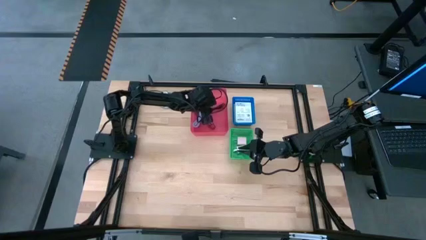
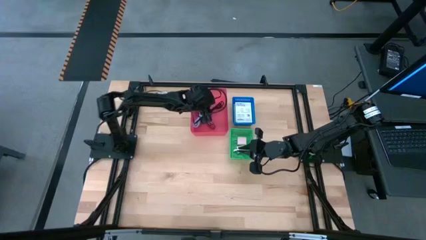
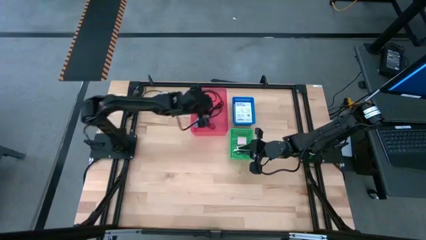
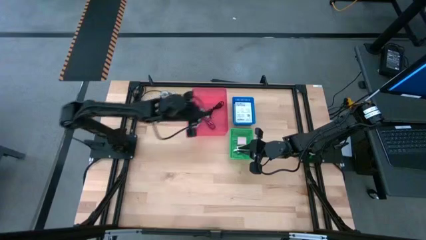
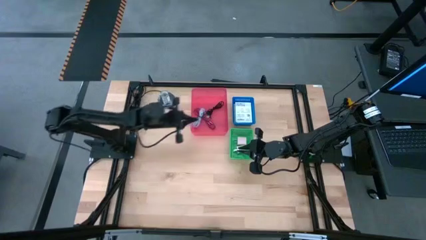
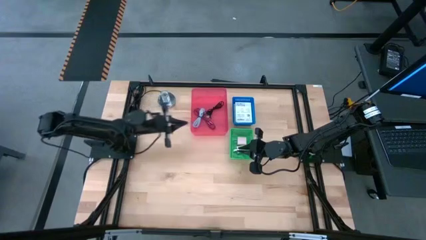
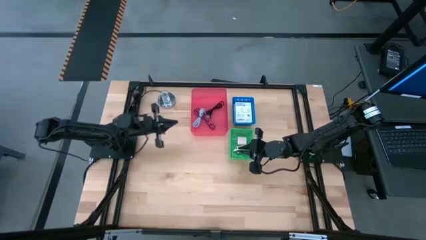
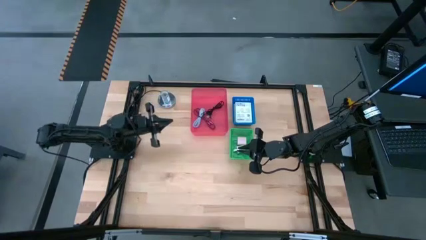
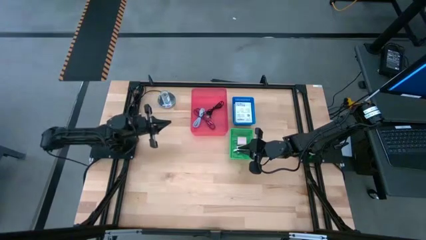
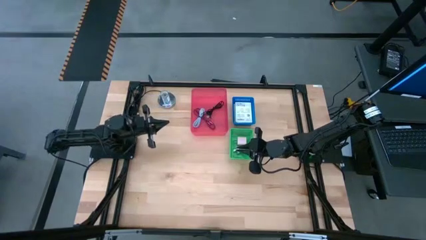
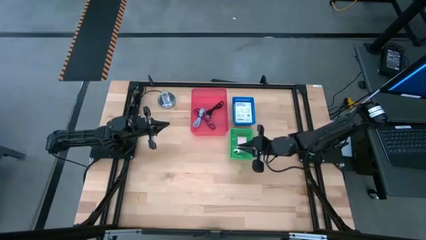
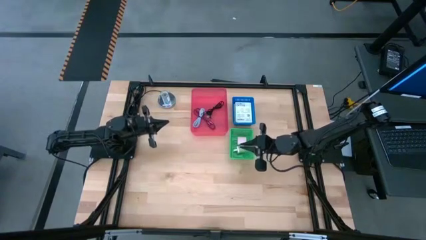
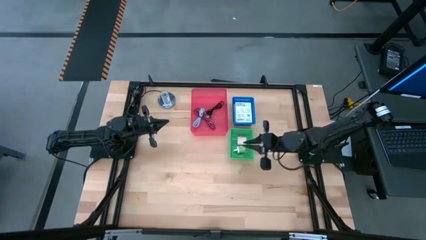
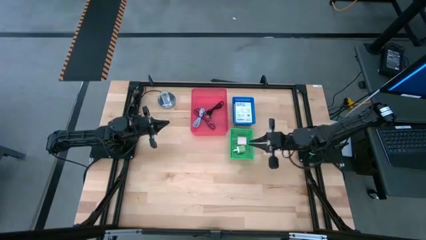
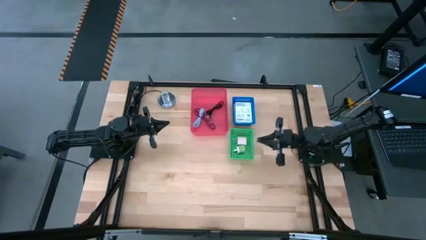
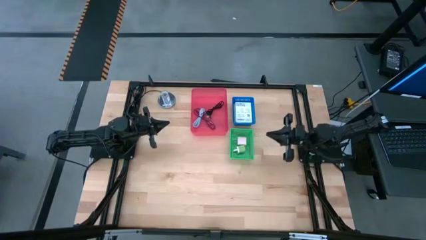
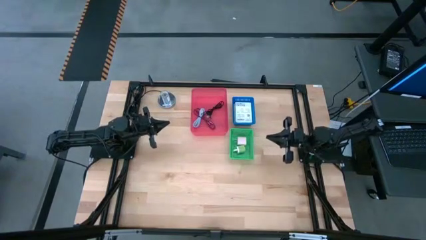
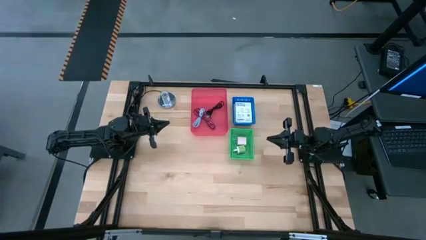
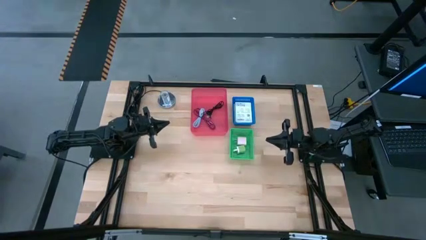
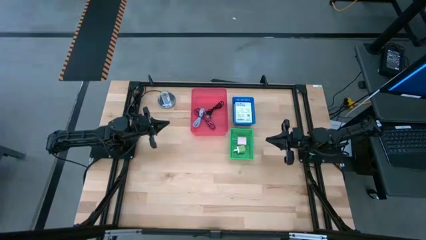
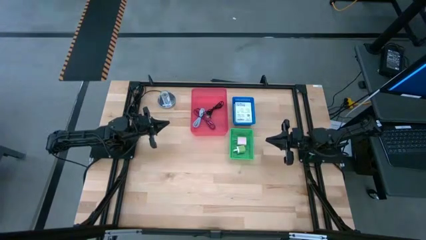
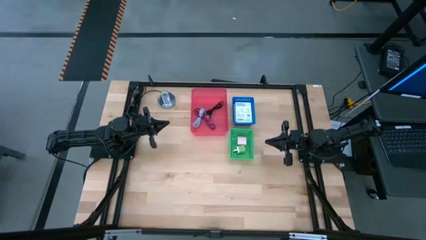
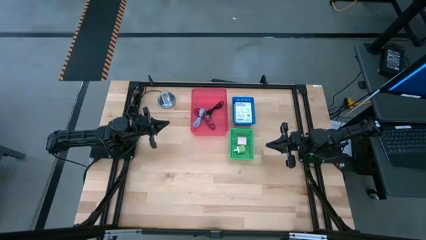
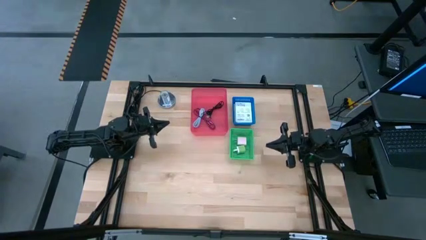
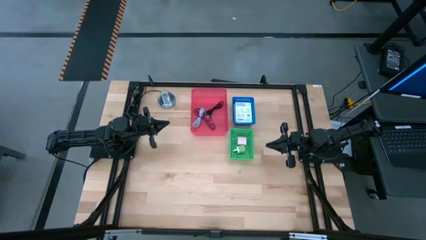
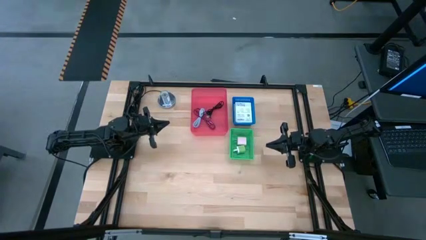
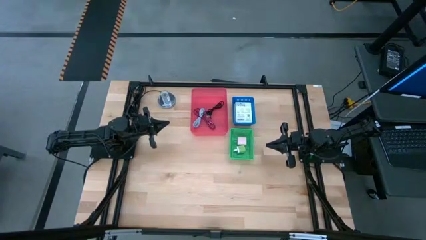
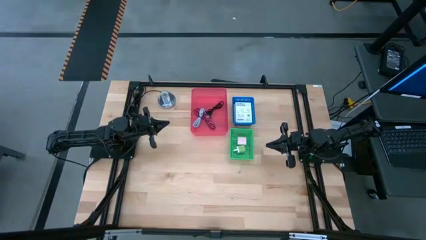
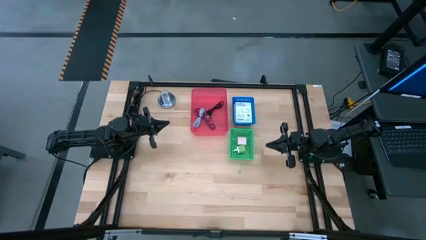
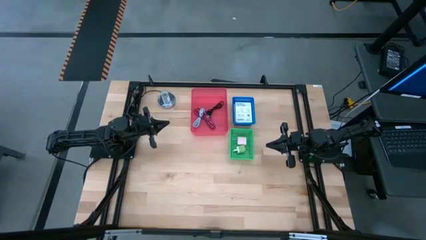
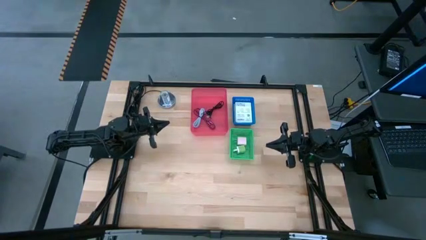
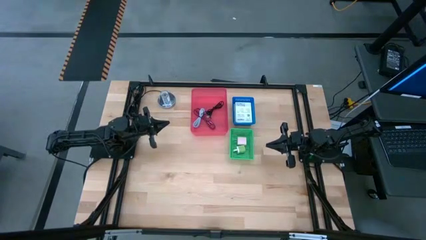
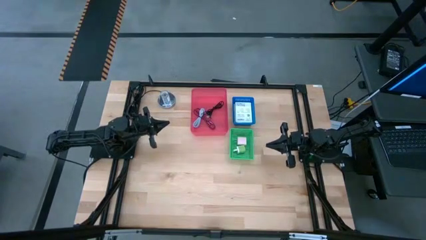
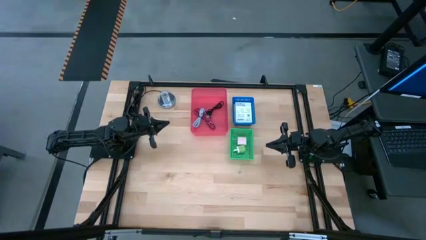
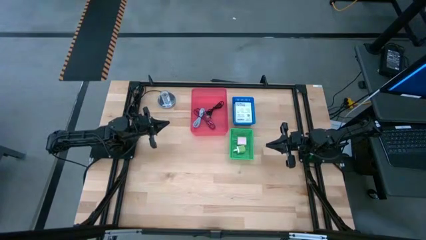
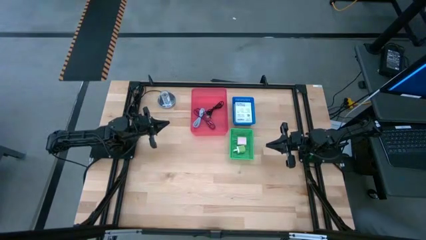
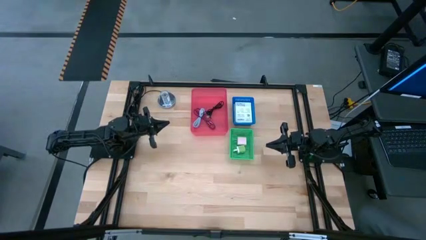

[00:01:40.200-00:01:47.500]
Task: Pick and place items into bin
Return to Home Position

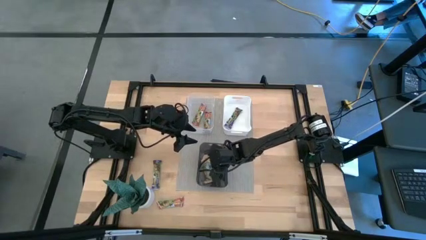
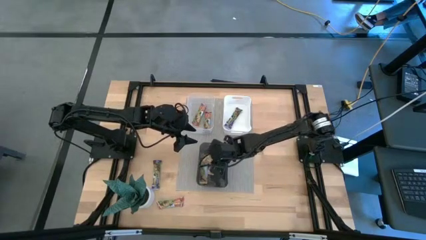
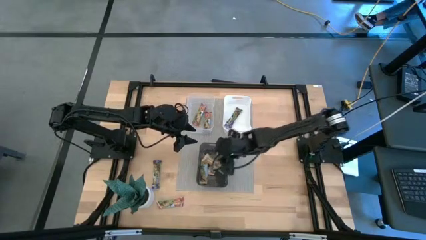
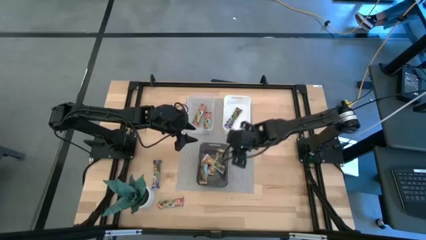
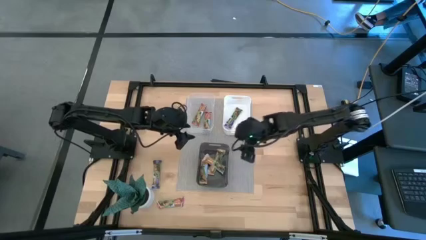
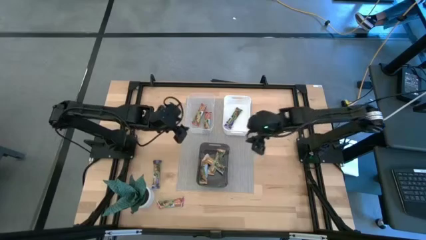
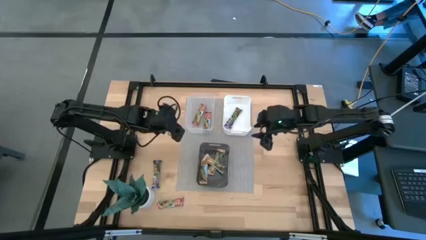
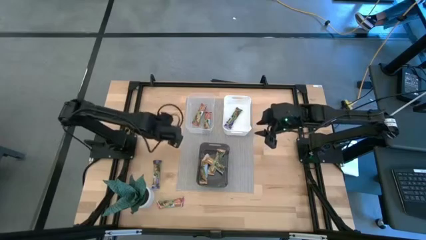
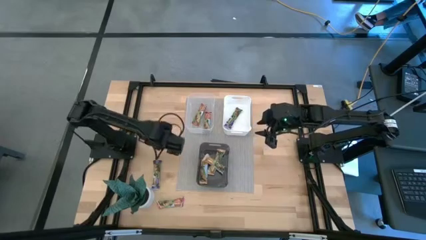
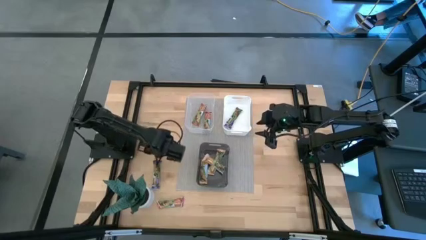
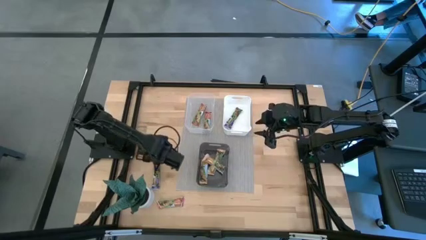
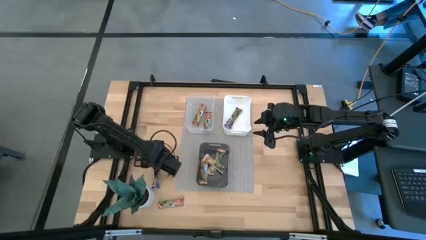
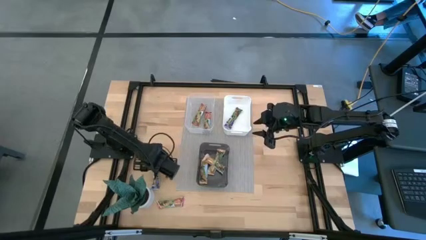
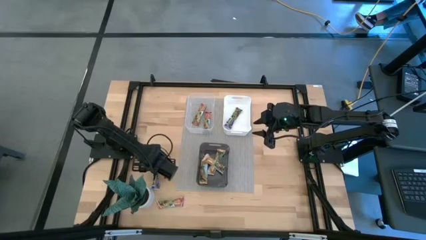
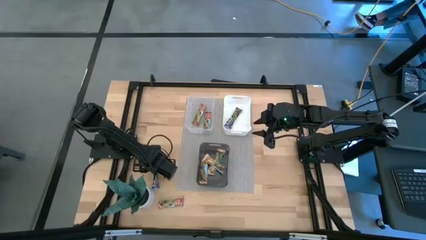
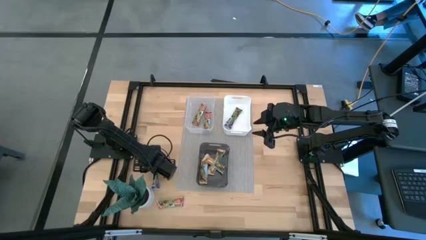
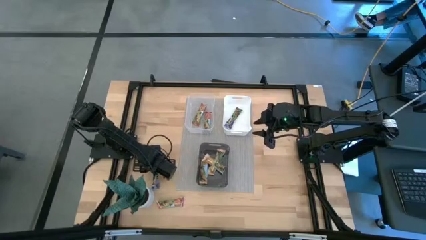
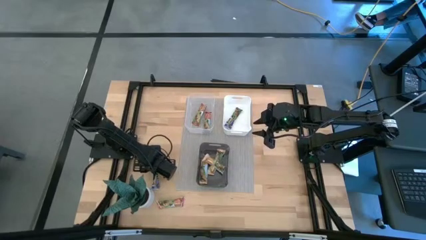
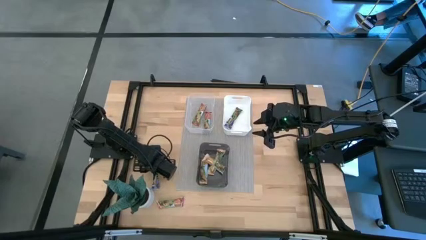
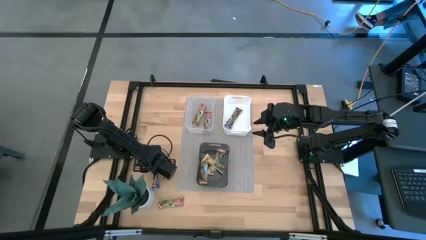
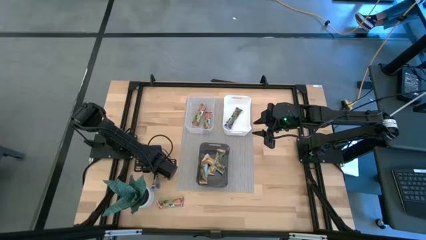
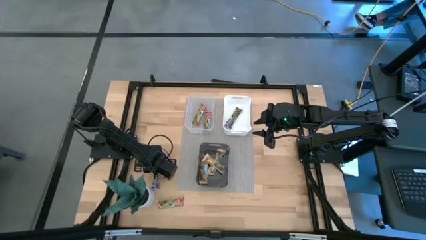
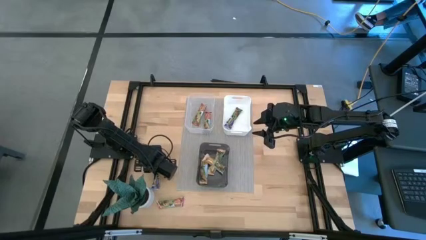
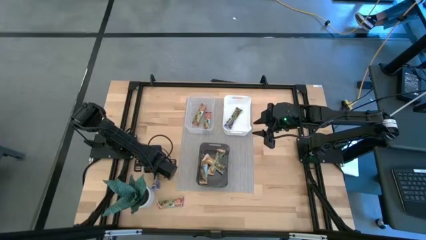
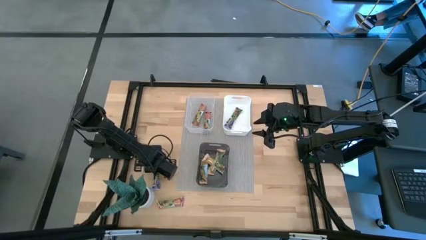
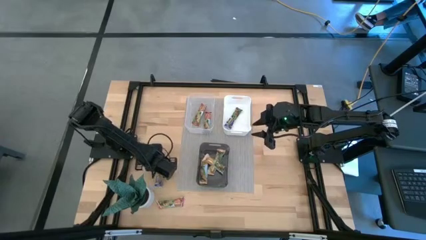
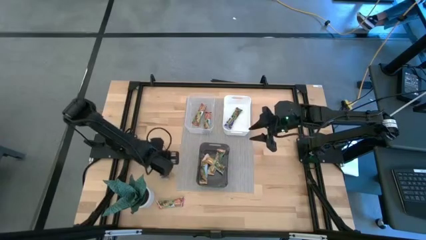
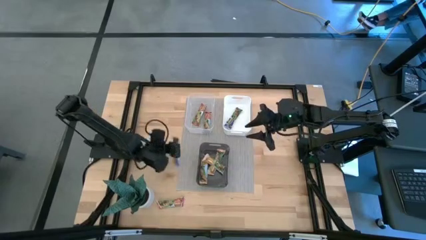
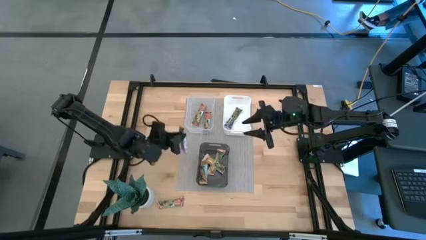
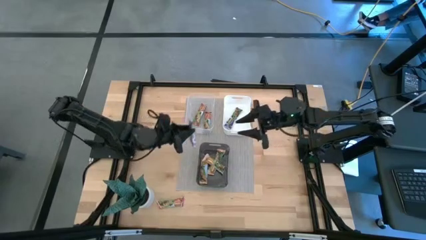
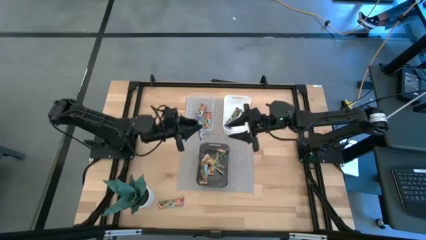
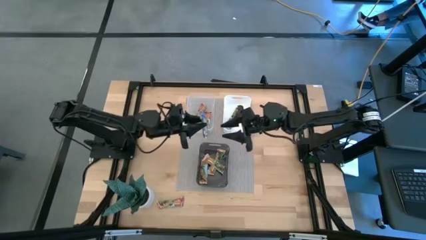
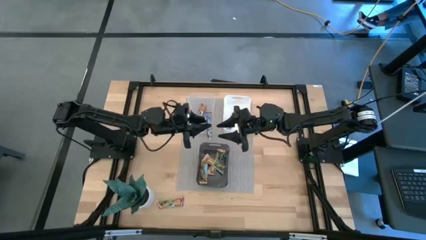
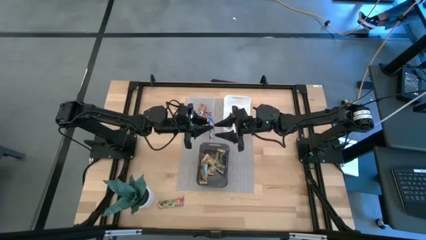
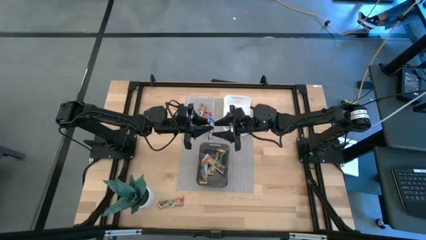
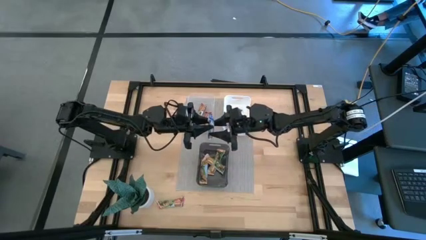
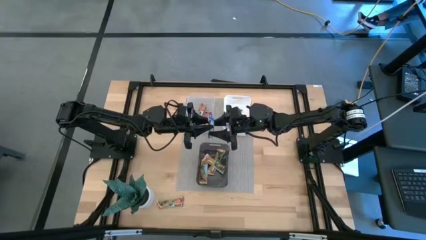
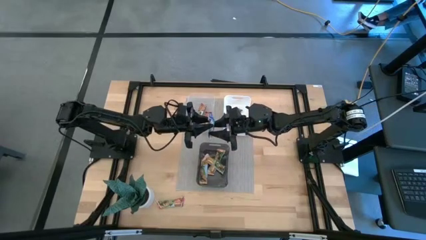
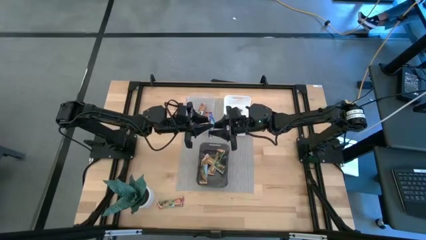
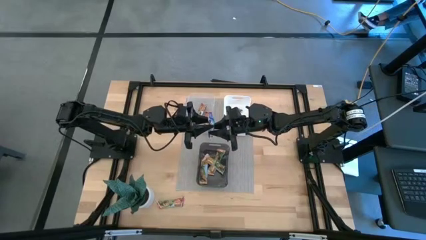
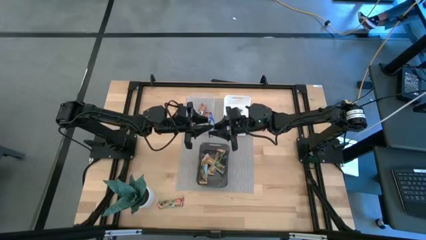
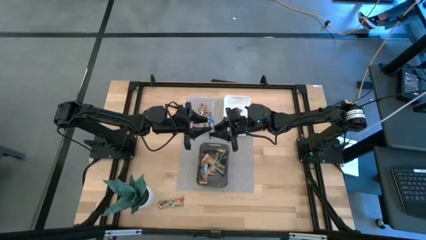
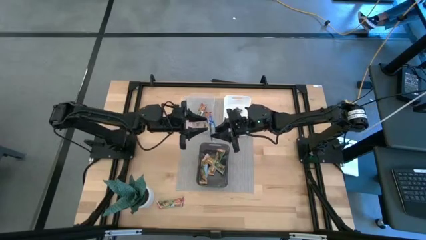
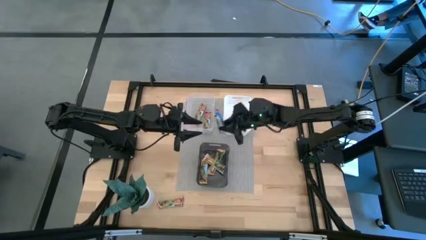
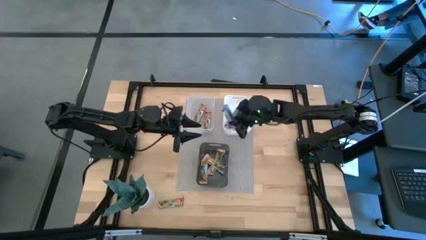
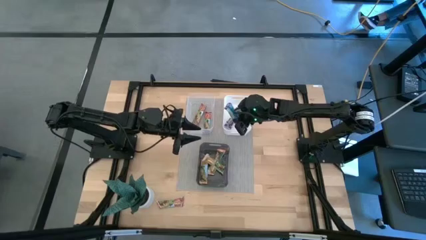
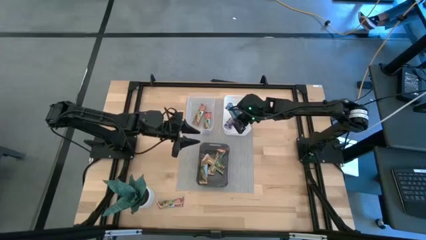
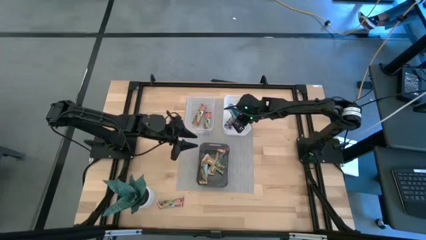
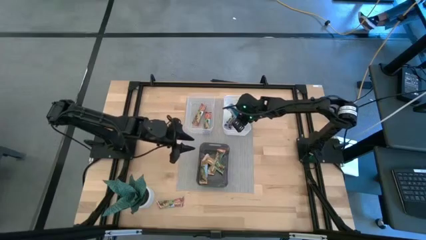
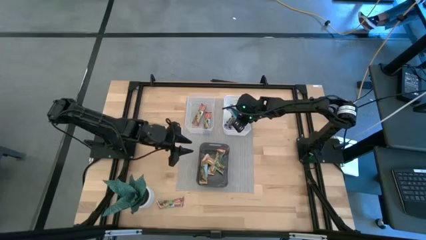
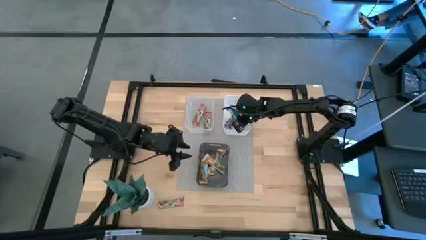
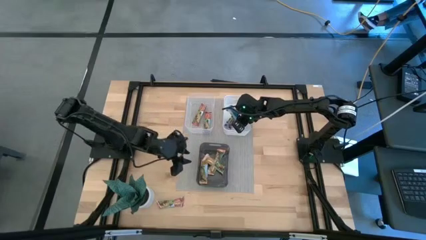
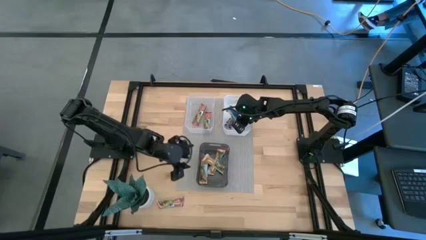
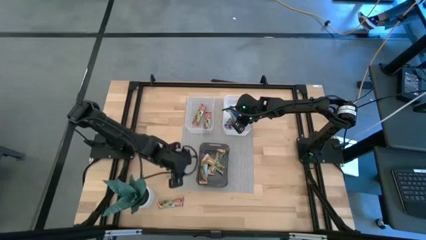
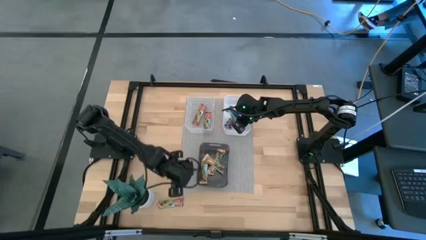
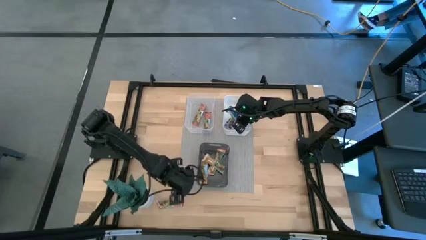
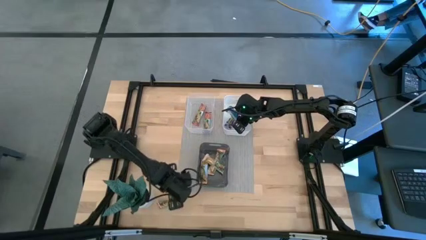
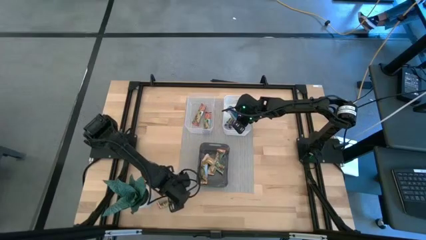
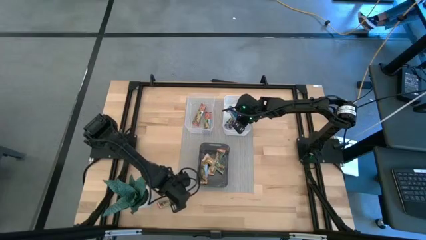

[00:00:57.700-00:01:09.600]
Task: Pick and place Granola Bars by type
Put the blue granola bar into the white bin
